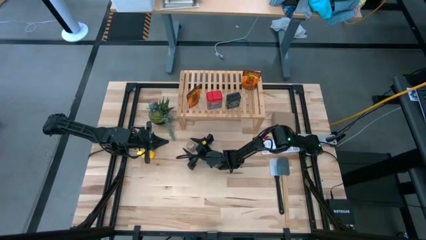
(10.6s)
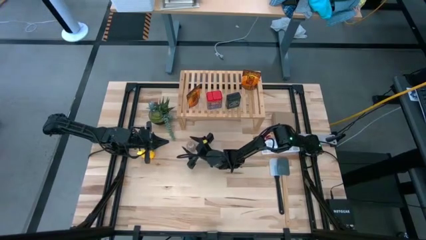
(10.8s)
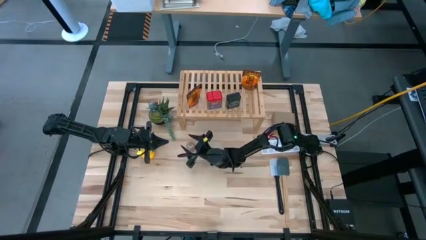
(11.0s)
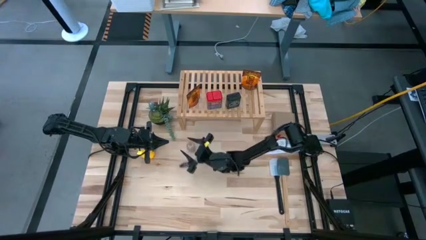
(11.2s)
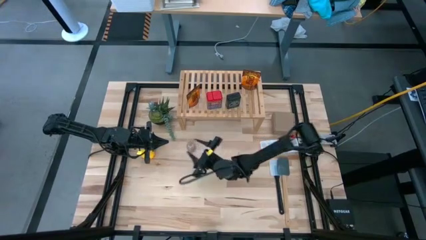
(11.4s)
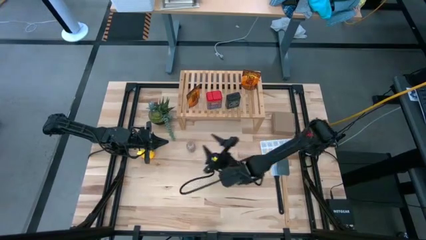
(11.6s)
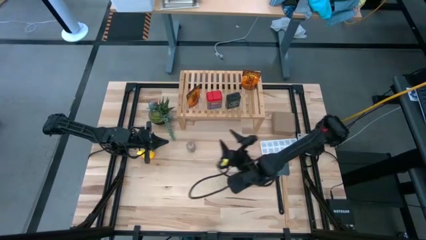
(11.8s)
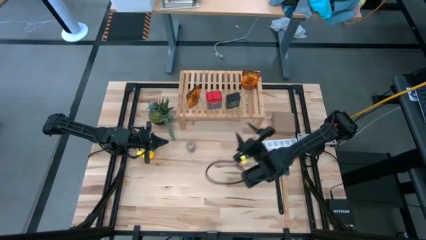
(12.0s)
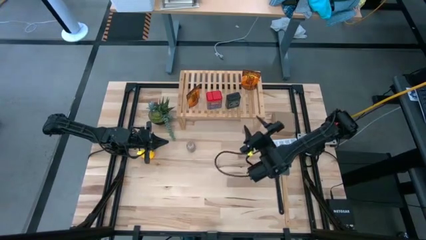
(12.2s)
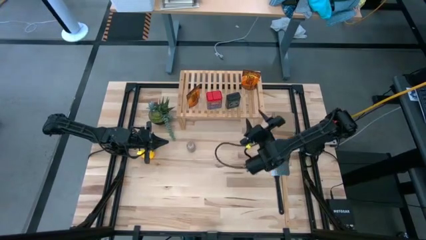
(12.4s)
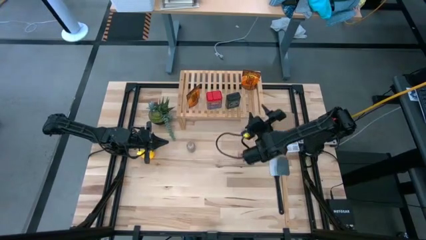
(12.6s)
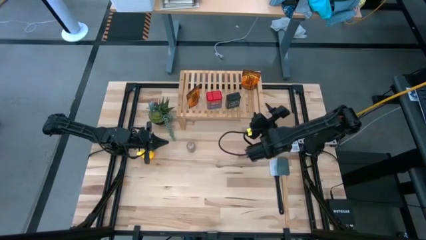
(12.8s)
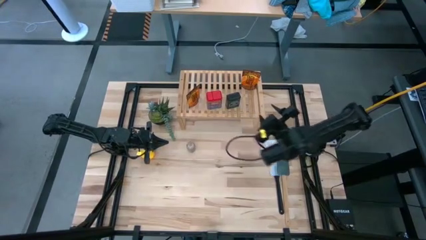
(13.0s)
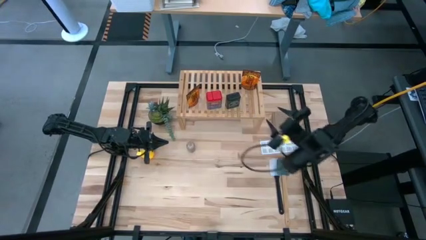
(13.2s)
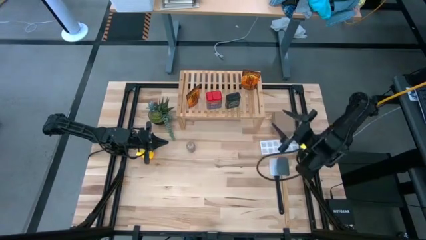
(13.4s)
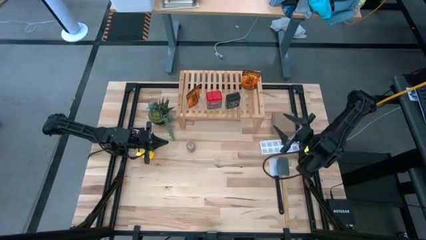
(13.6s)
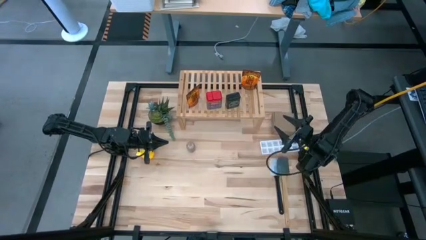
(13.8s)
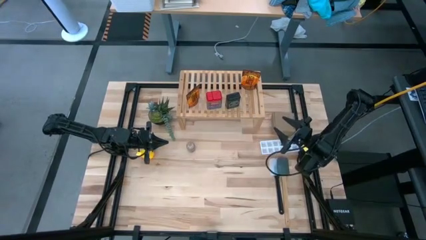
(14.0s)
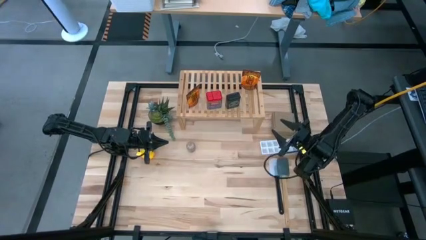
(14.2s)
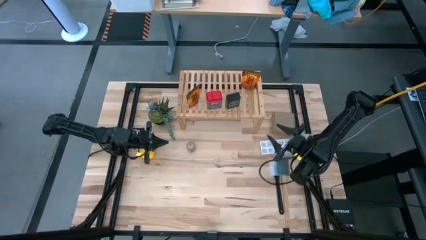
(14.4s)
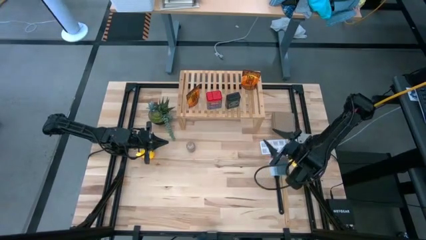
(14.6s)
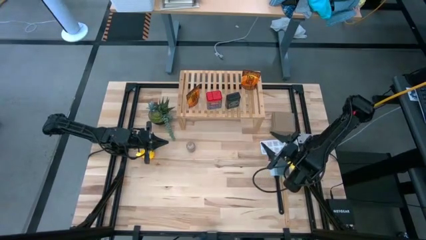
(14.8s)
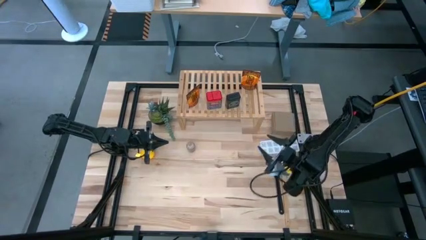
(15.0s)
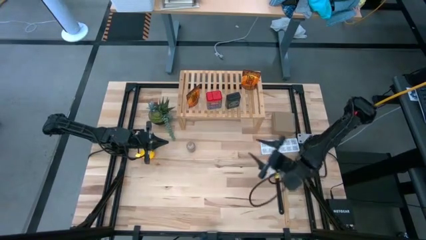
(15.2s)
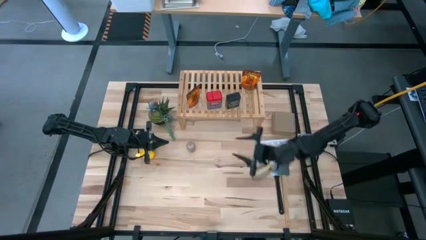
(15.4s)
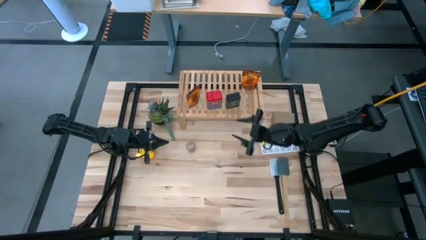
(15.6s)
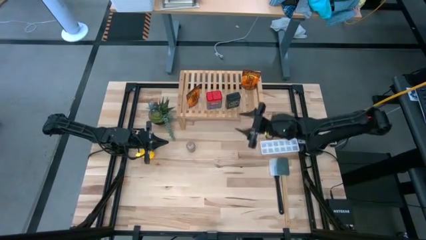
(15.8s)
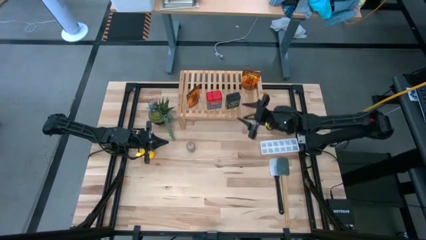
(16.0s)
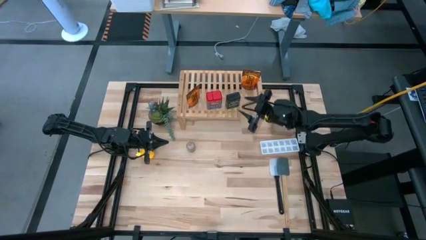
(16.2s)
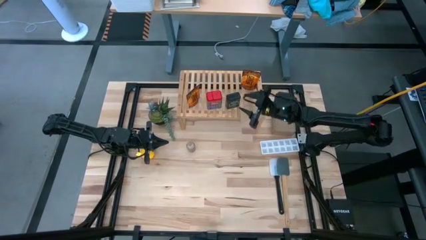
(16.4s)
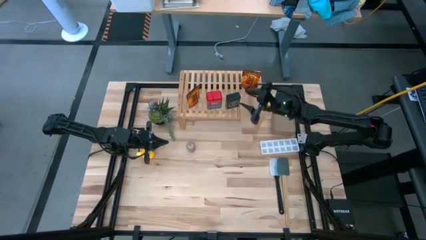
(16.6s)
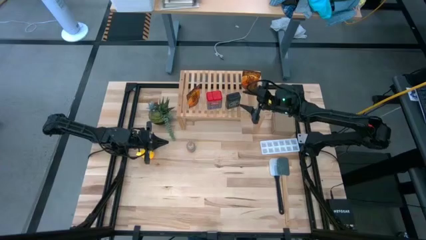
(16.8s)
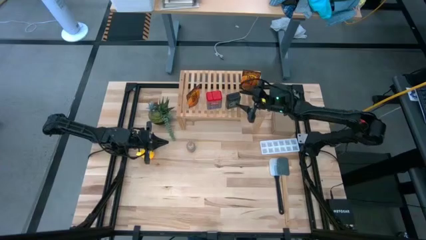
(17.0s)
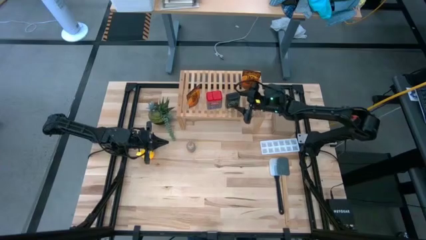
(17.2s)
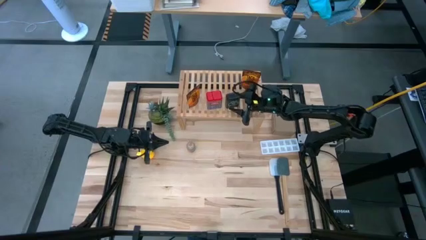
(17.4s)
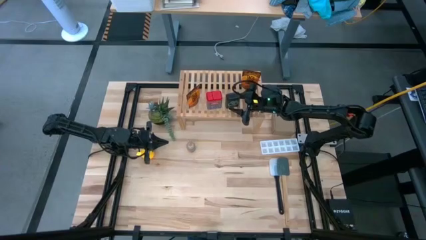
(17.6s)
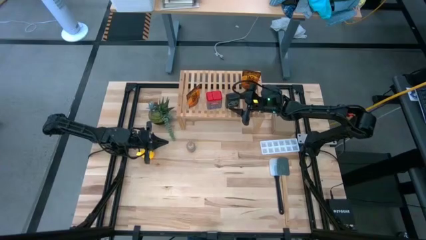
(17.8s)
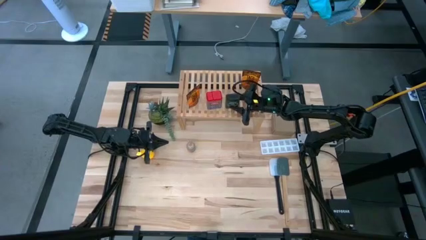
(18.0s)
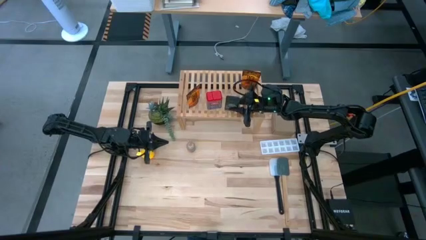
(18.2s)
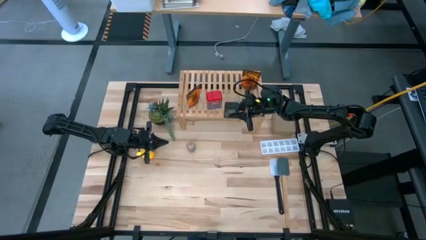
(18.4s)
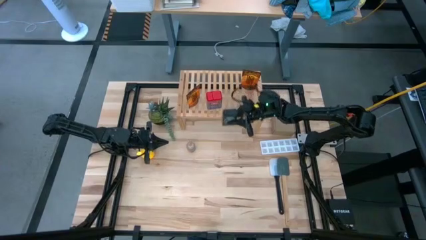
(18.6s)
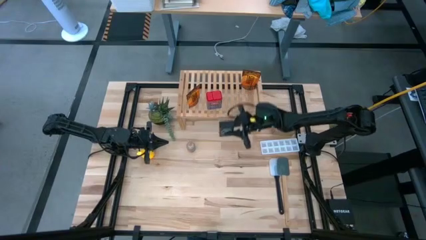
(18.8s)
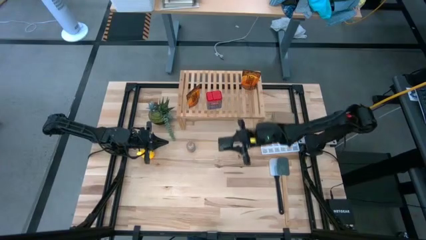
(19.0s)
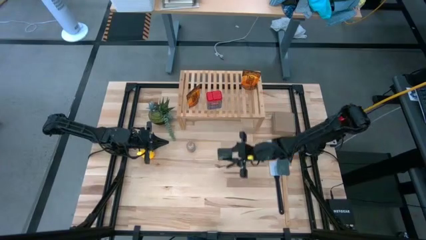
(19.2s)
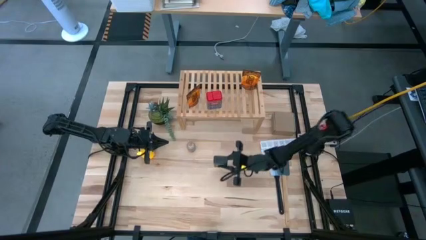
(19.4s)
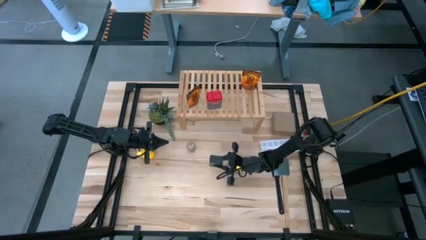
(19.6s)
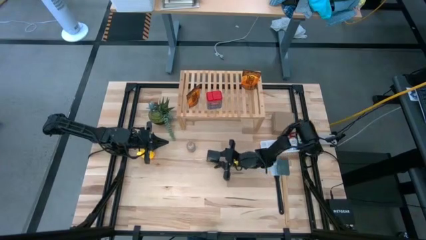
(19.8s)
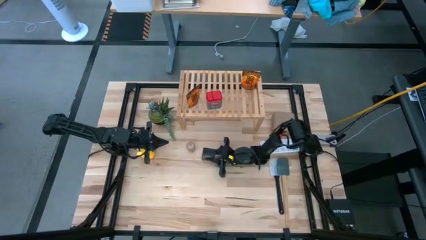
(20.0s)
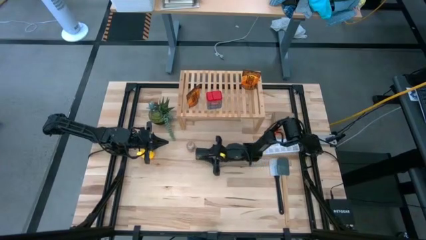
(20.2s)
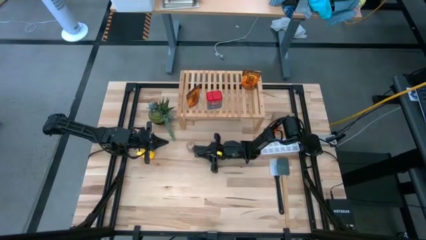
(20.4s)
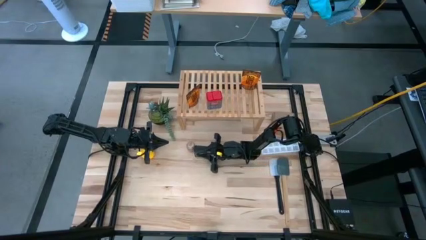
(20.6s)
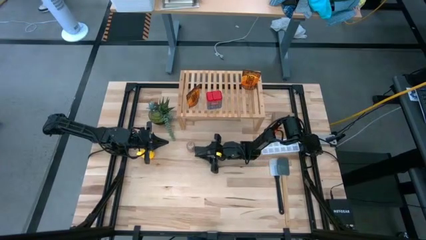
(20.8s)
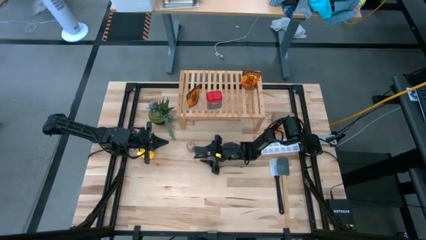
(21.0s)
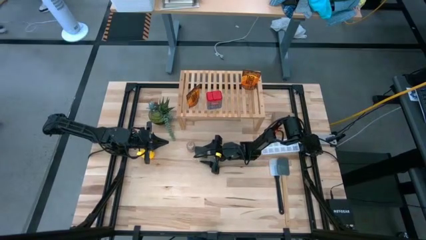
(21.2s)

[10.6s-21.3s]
Task: Shelf spices
Remove the black seasoning can from the shelf

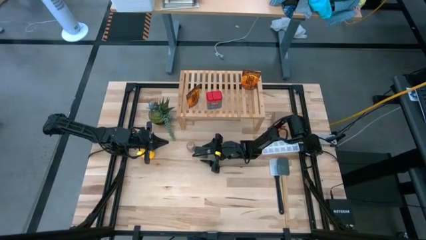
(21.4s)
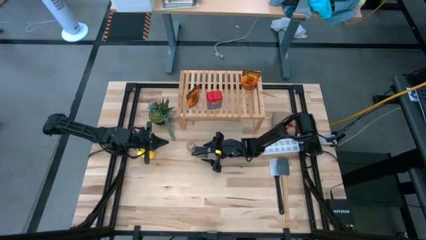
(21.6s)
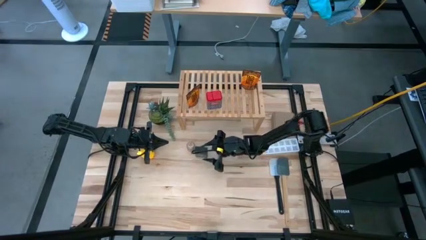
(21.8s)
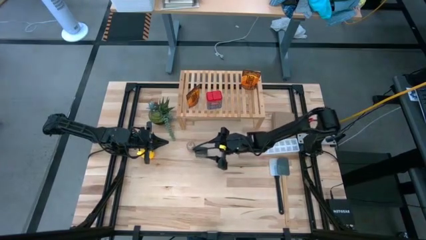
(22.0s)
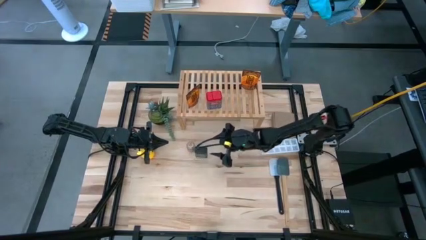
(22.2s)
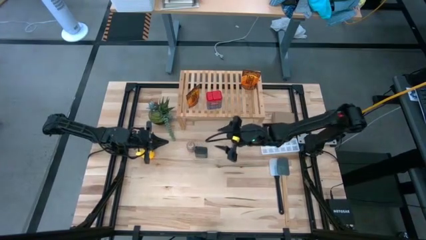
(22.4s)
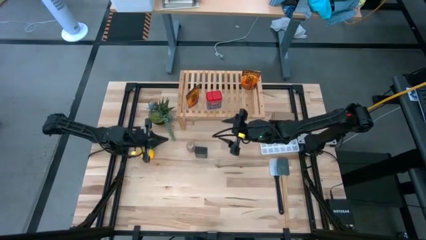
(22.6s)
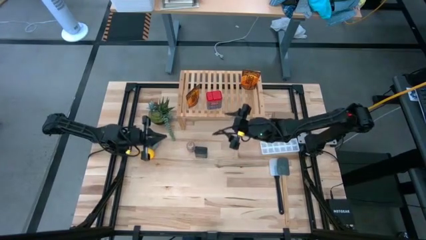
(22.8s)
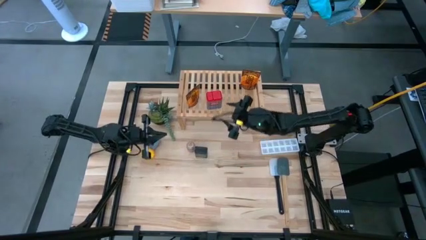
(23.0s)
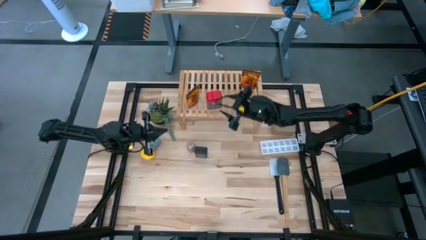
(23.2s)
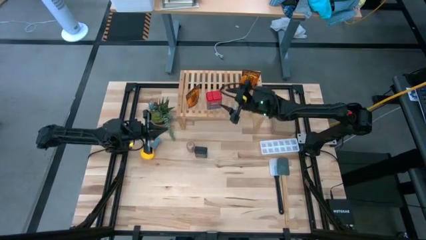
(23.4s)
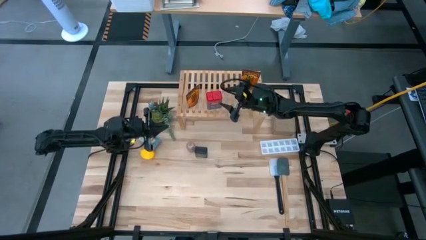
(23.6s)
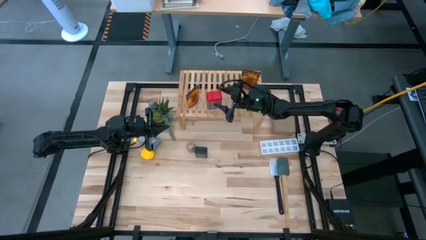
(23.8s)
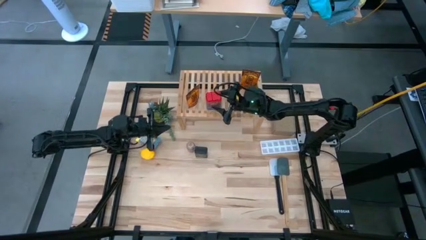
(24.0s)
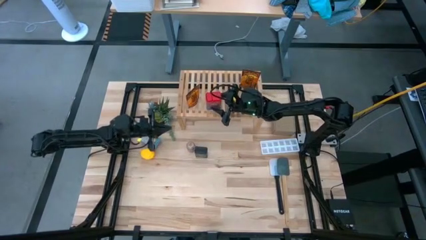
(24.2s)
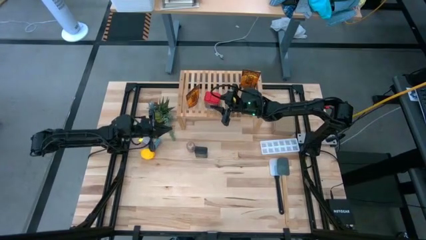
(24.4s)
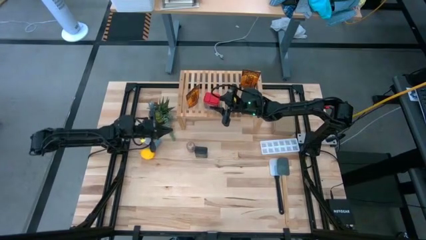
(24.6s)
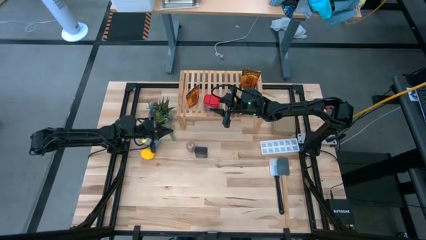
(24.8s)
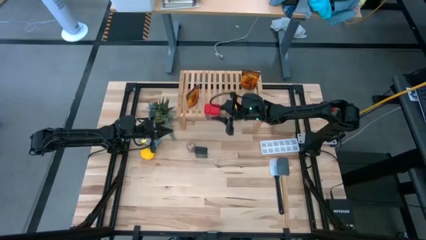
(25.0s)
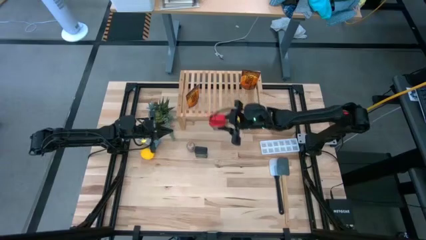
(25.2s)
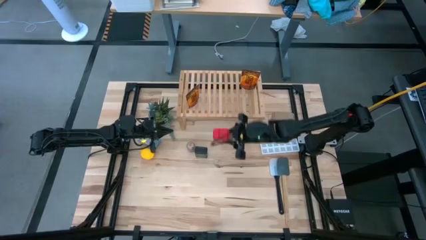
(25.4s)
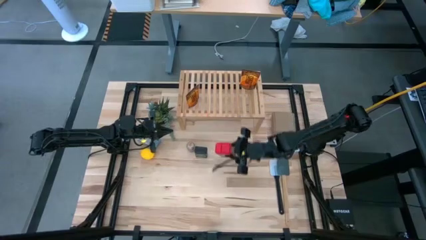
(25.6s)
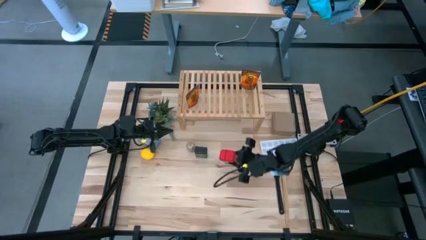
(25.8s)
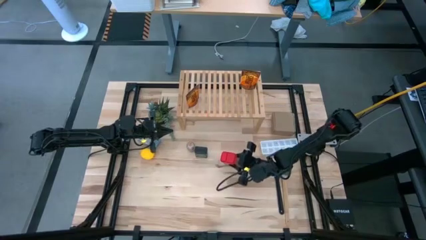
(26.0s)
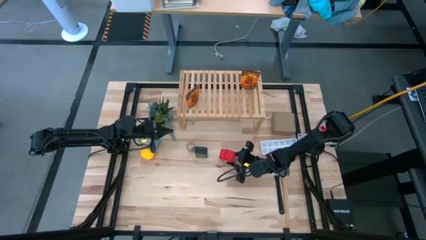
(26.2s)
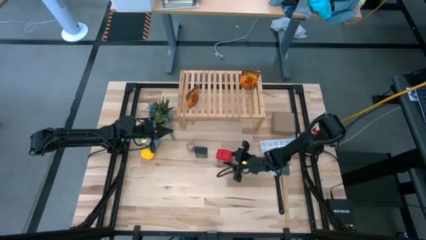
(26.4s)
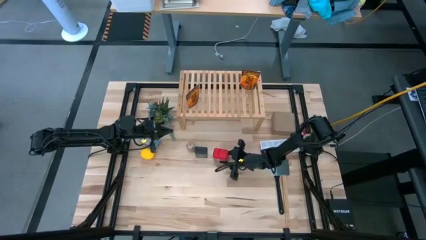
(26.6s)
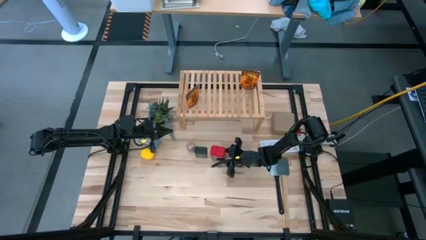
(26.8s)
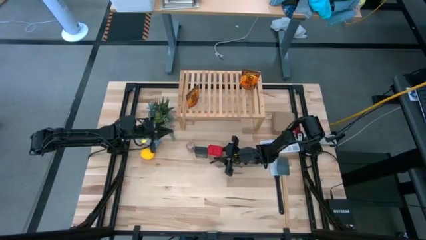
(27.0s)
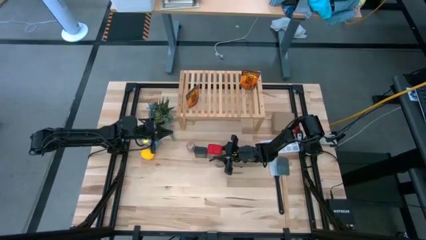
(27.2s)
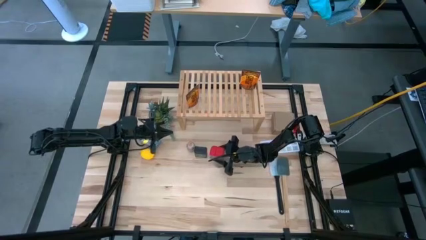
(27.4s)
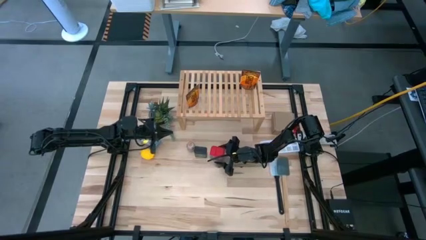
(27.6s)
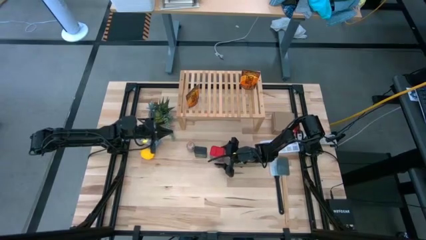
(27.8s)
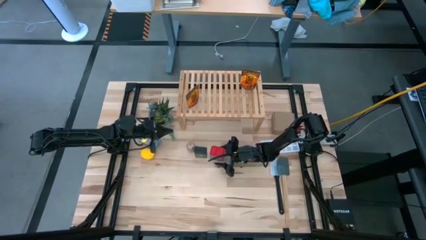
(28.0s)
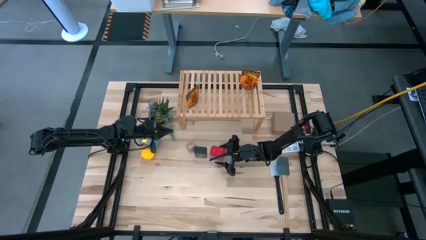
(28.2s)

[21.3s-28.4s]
Remove the red seasoning can from the shelf
